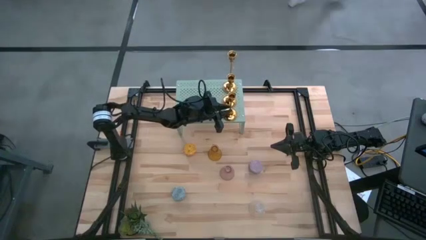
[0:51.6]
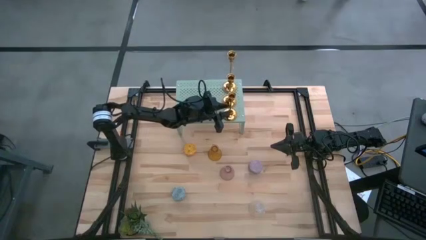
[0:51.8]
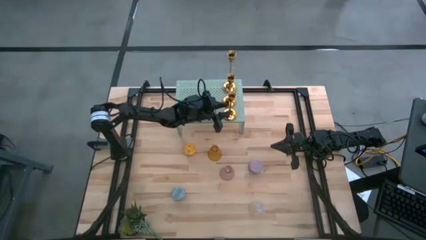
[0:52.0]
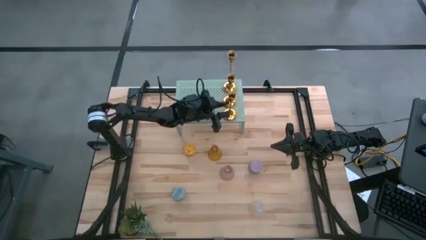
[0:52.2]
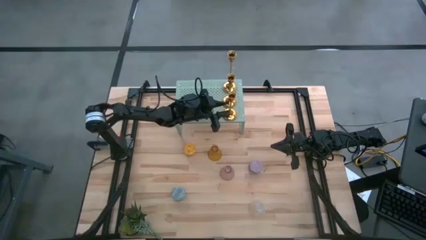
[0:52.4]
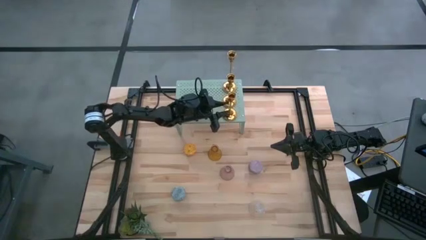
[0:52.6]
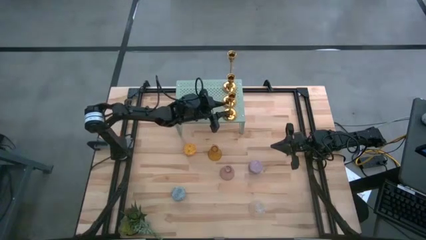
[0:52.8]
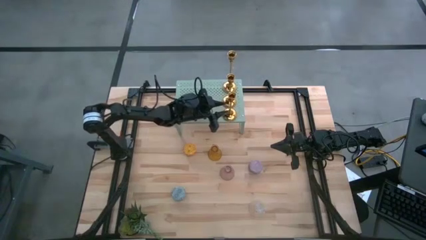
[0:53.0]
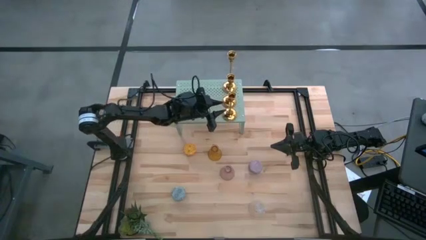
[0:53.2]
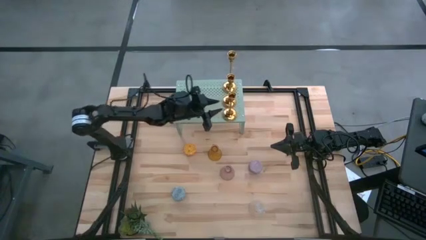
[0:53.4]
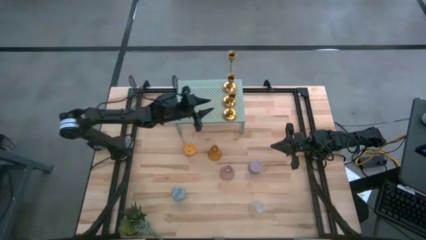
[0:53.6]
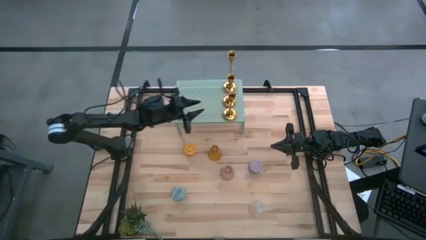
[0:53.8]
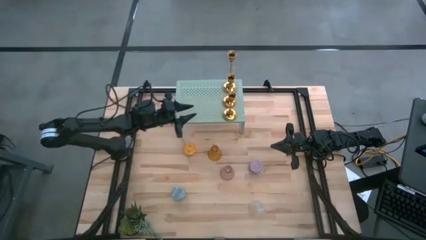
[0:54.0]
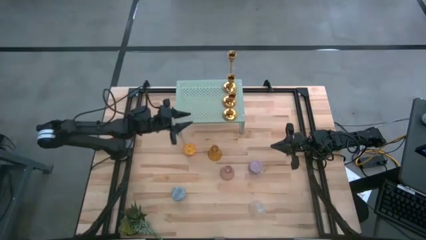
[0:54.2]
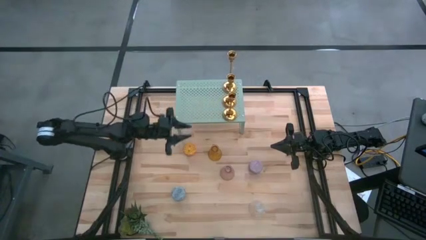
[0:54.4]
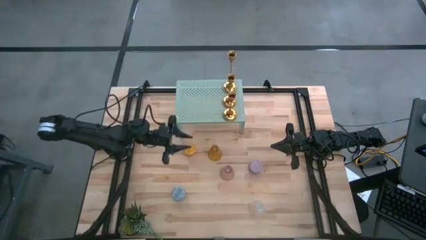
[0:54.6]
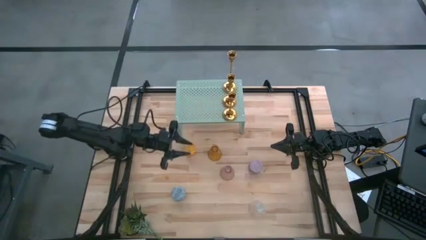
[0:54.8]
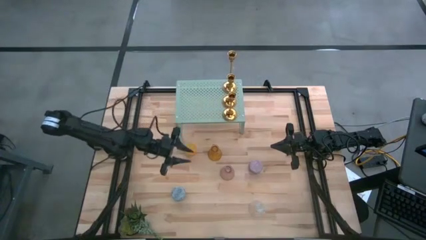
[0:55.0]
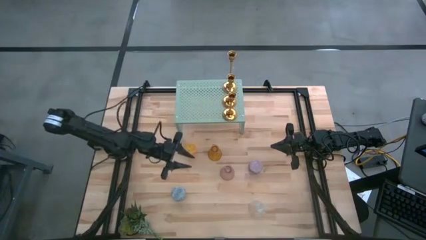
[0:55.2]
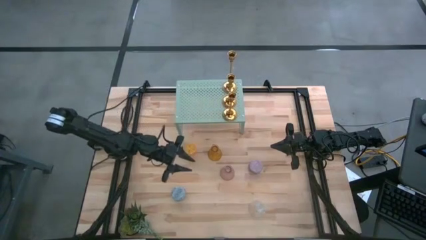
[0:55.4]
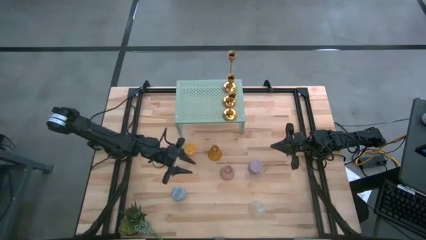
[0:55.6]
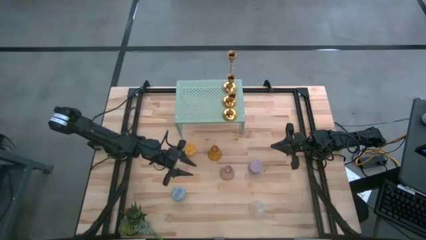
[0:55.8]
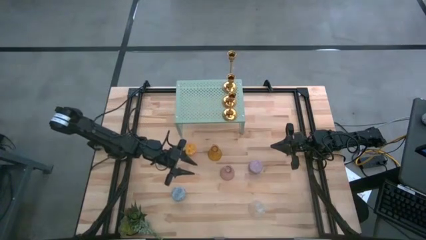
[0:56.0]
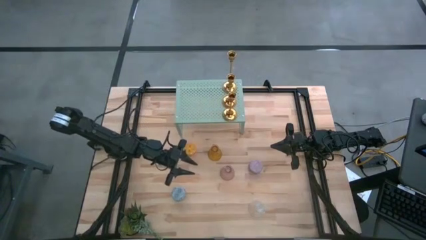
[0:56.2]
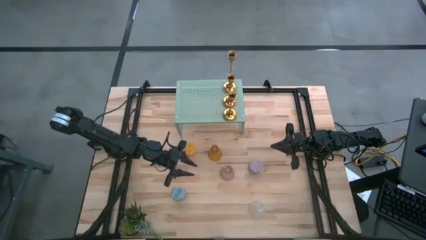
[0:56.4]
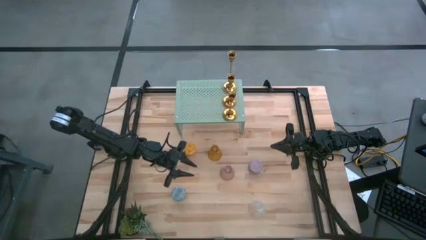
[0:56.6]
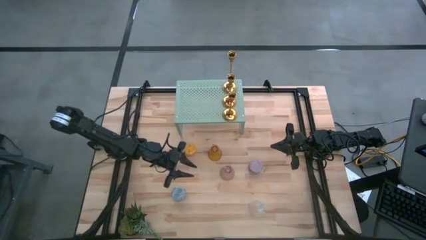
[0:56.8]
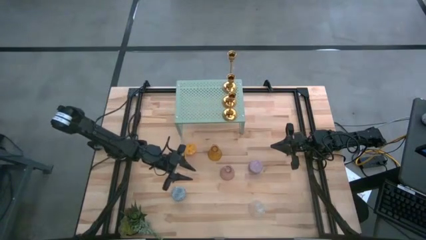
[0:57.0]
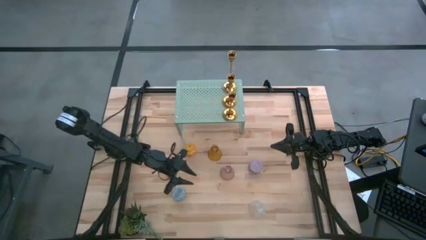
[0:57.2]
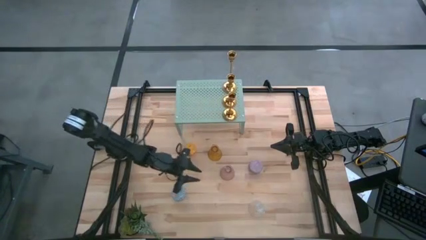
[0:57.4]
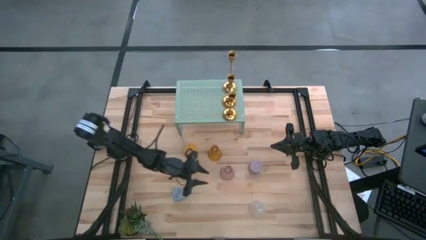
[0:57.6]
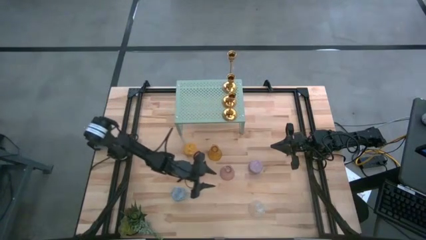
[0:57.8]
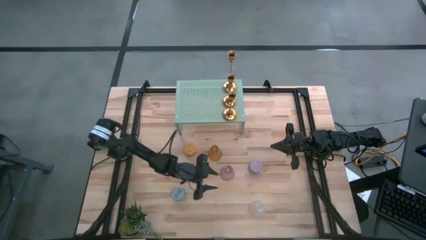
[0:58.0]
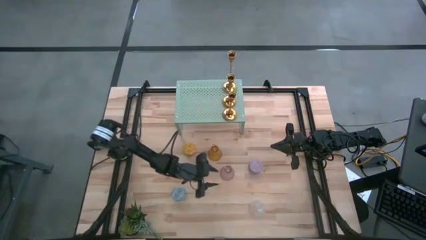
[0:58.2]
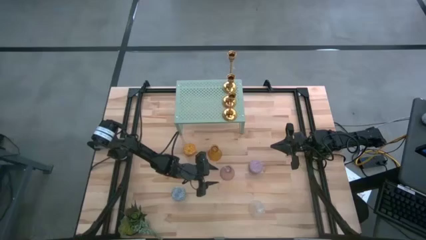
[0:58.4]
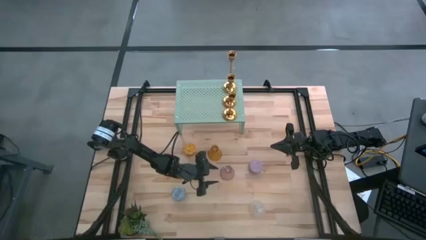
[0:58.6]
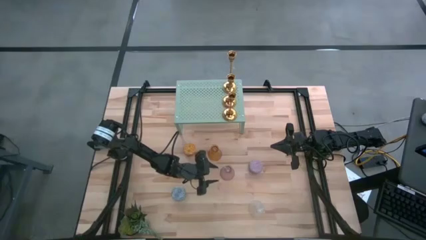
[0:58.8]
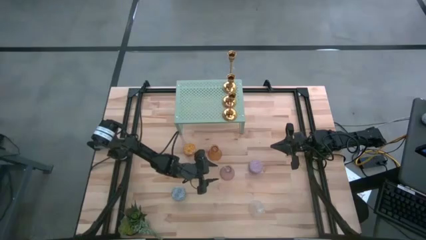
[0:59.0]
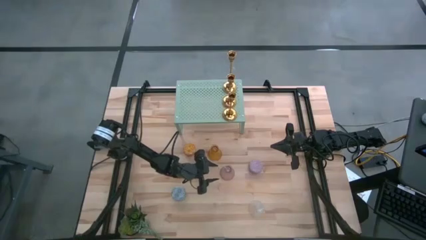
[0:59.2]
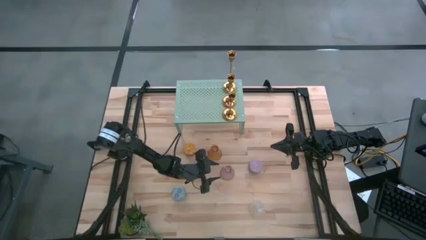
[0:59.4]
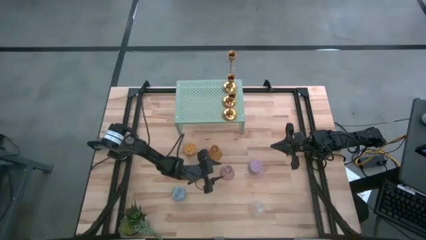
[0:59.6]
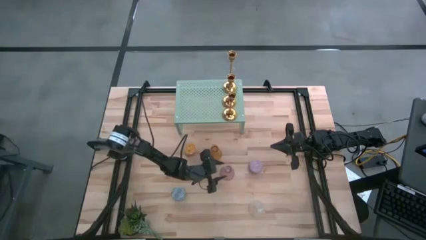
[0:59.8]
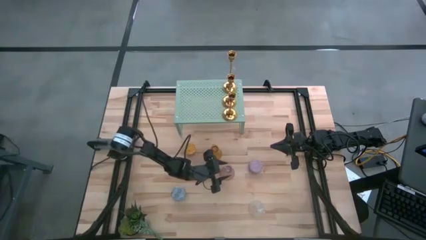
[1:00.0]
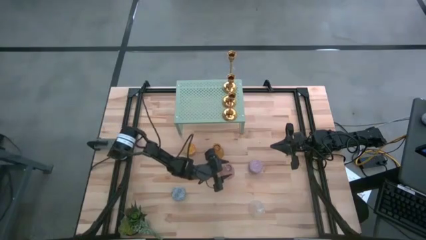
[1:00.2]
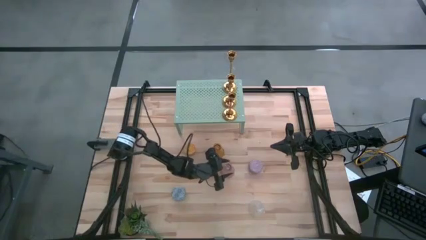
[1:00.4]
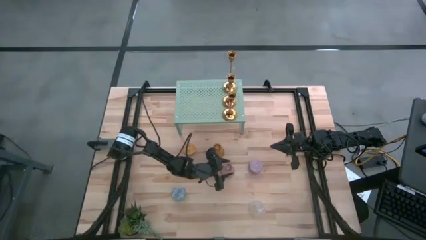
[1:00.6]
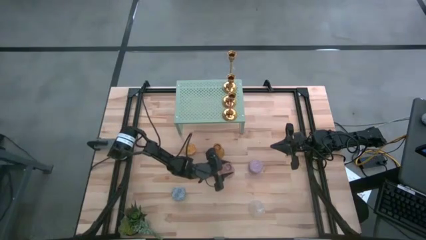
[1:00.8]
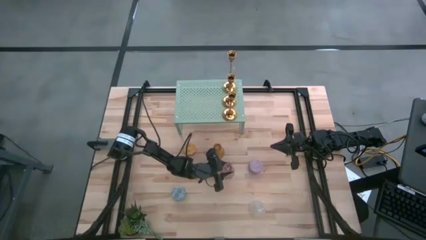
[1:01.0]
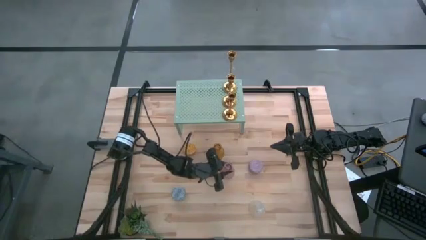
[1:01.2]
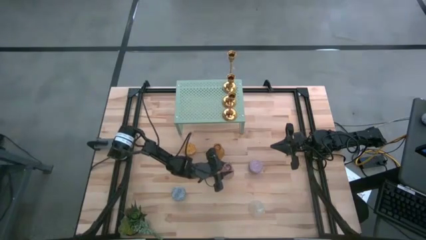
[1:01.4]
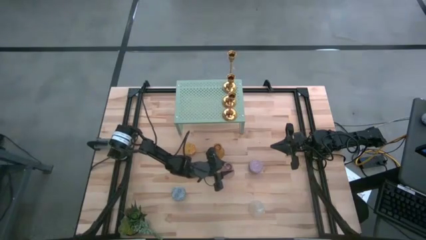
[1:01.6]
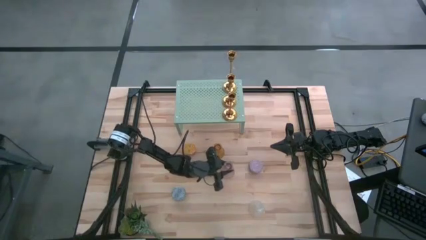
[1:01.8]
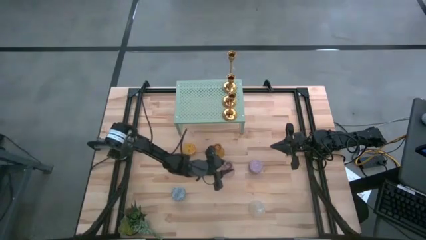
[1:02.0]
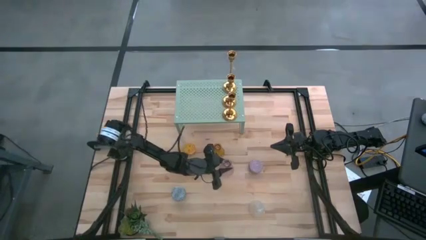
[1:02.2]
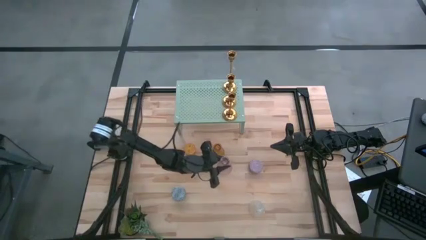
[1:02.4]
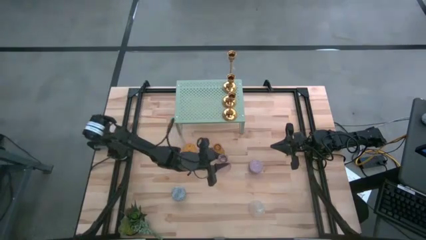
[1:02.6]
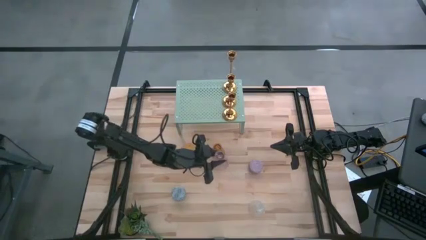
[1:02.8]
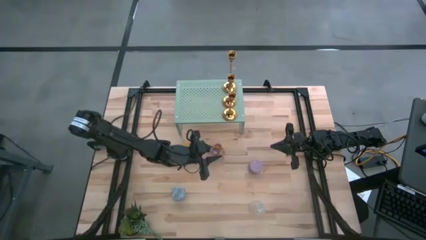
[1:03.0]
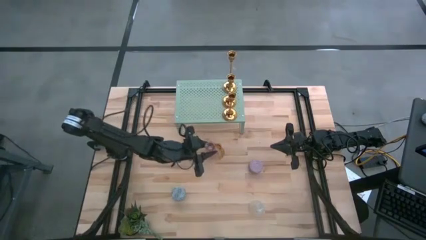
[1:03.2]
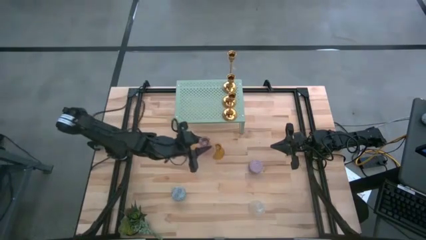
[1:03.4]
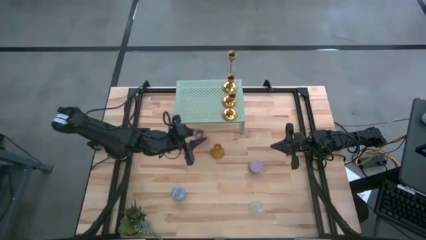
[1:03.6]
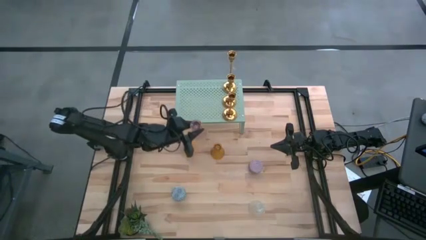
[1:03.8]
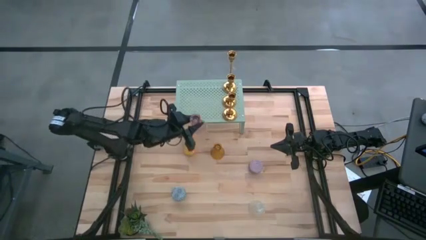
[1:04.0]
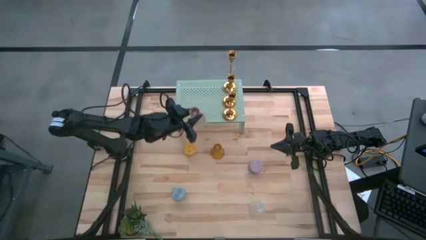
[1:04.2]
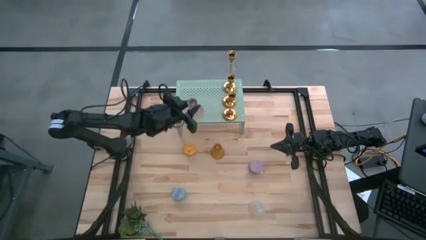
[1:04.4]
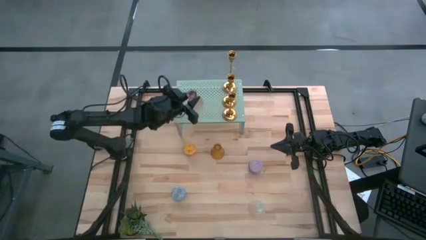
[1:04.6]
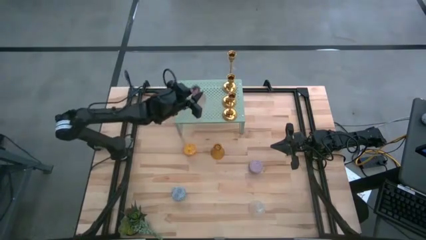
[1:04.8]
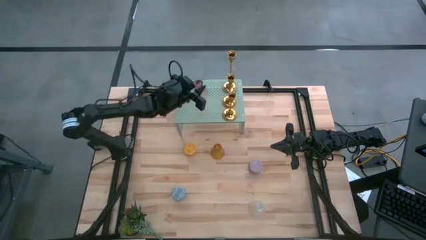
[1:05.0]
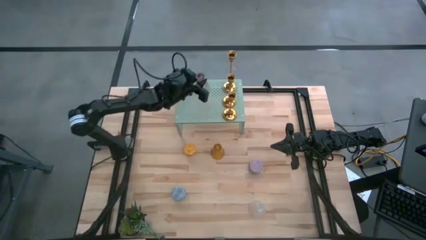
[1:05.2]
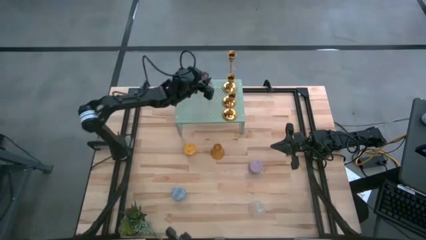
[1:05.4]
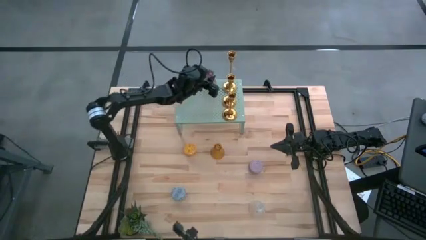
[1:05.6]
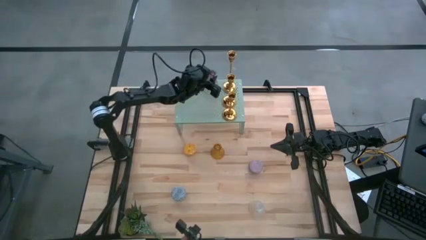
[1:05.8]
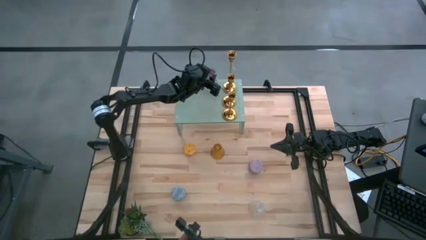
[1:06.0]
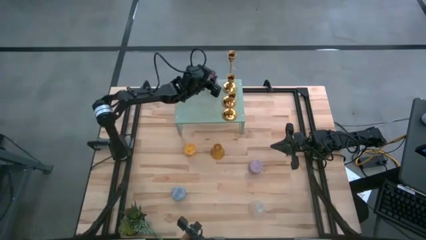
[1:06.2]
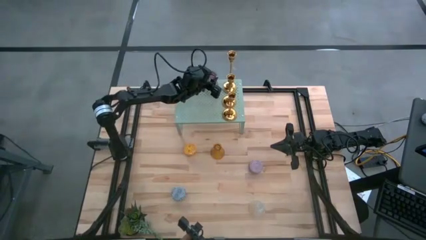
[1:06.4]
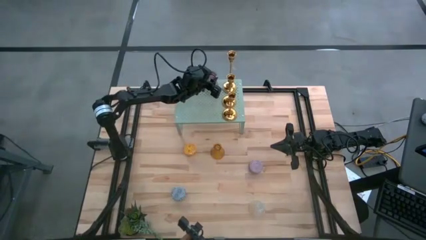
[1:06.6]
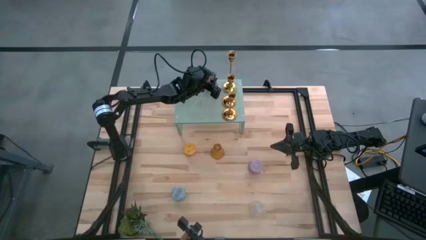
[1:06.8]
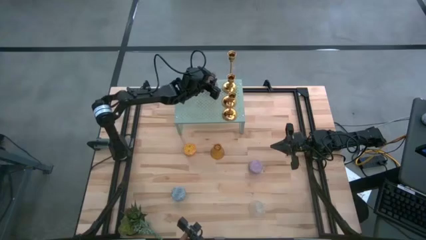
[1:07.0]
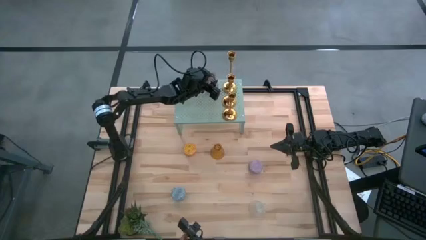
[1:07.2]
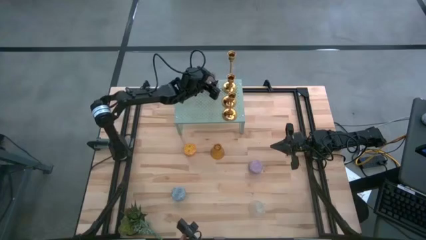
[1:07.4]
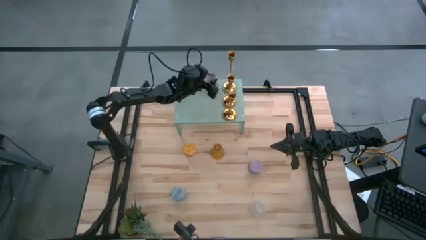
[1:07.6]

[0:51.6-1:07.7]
Task: Pick & Place candle stick holders
Put the pink glass candle holder on the shelf
